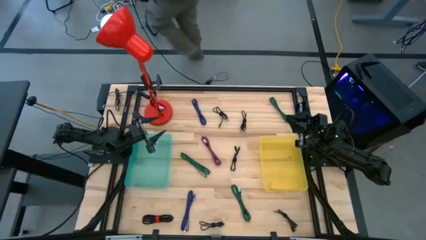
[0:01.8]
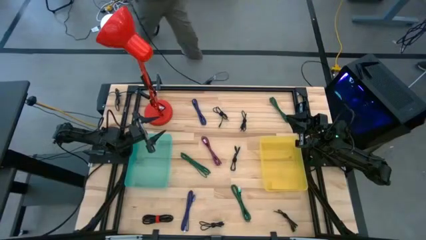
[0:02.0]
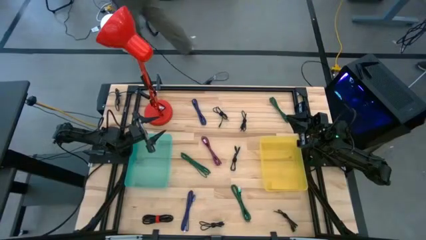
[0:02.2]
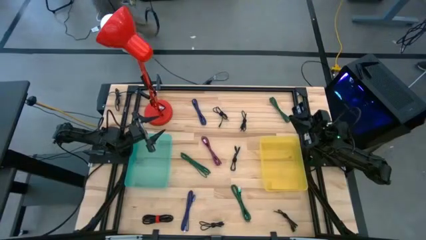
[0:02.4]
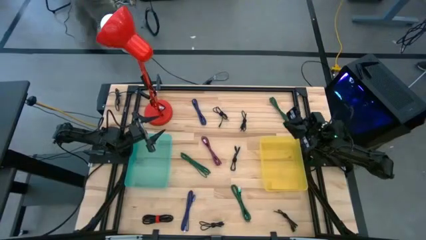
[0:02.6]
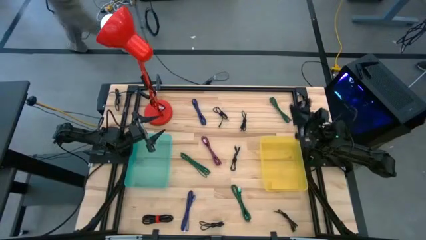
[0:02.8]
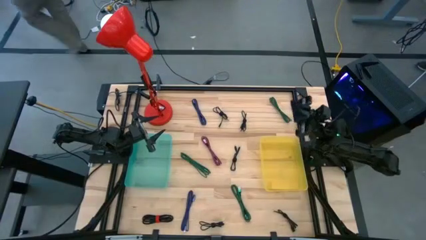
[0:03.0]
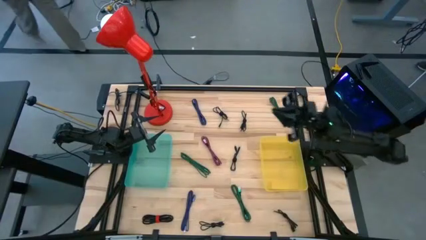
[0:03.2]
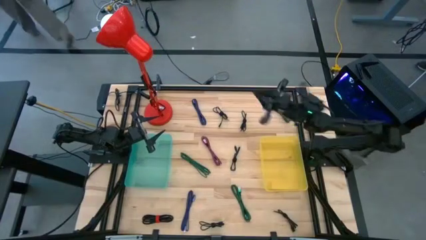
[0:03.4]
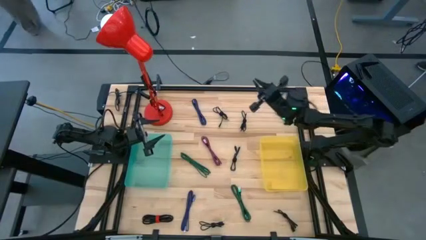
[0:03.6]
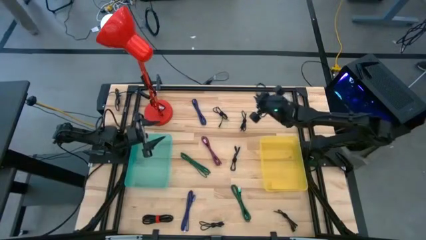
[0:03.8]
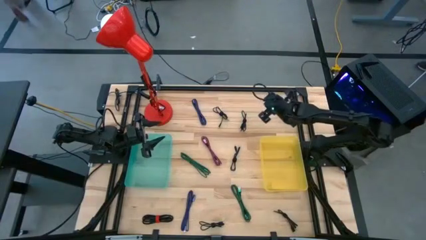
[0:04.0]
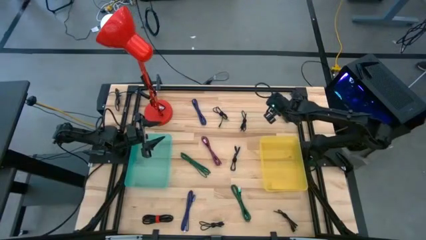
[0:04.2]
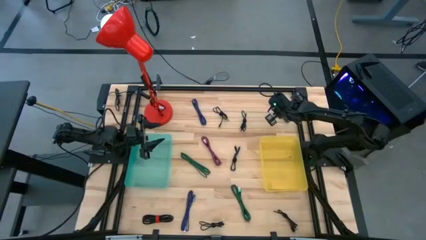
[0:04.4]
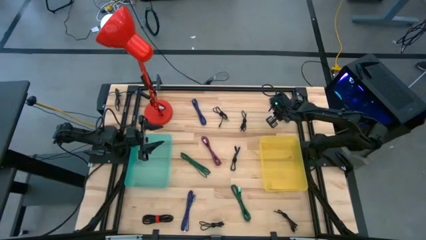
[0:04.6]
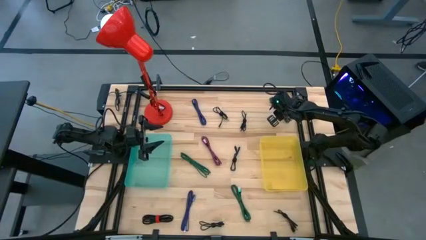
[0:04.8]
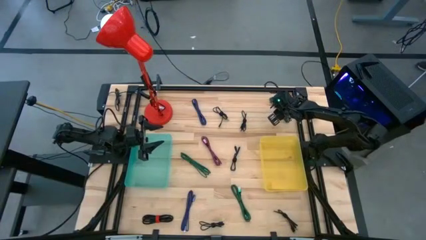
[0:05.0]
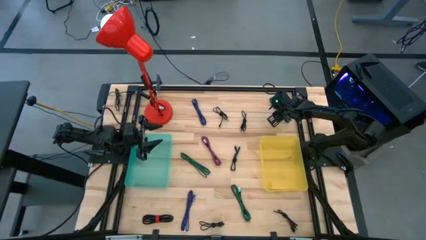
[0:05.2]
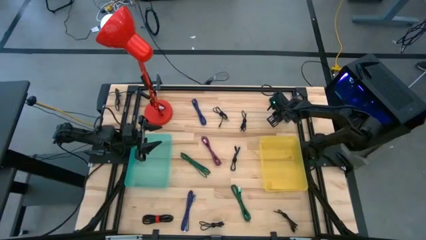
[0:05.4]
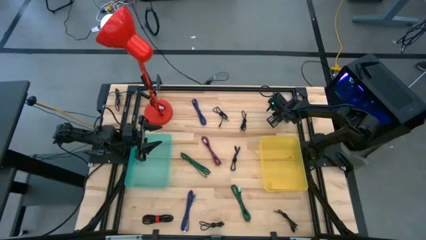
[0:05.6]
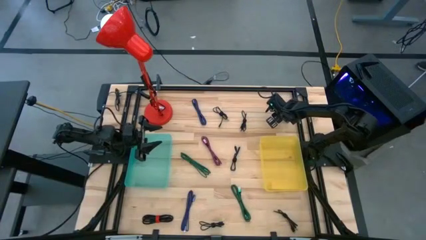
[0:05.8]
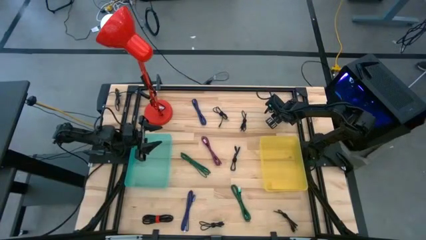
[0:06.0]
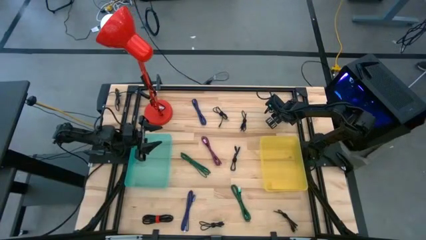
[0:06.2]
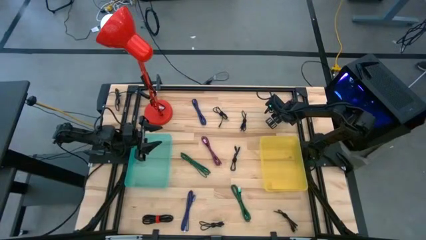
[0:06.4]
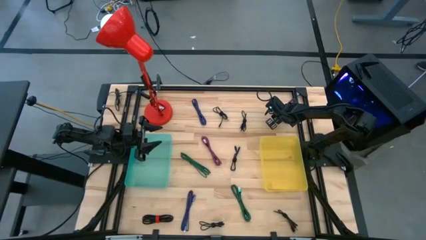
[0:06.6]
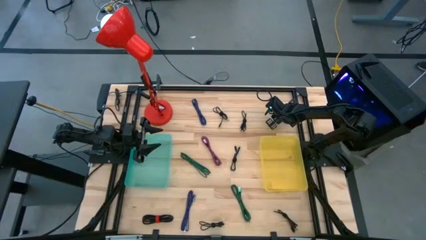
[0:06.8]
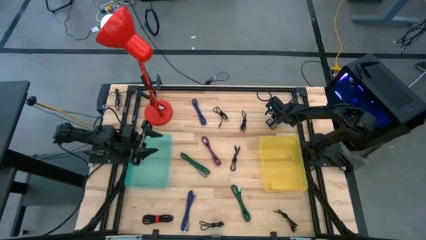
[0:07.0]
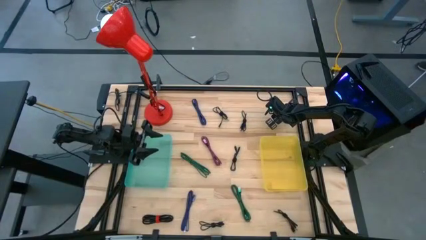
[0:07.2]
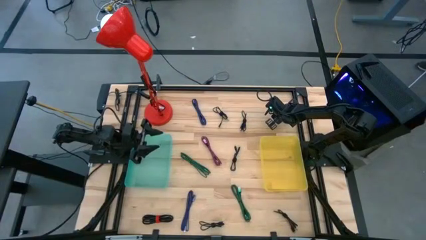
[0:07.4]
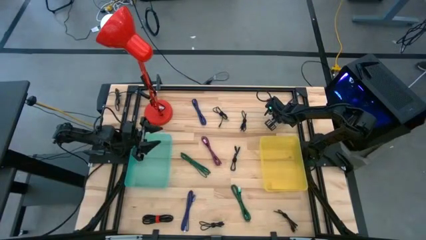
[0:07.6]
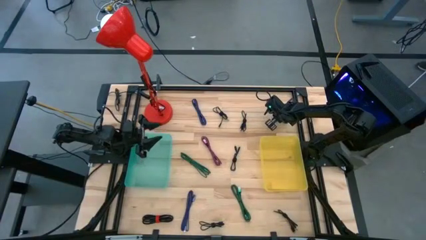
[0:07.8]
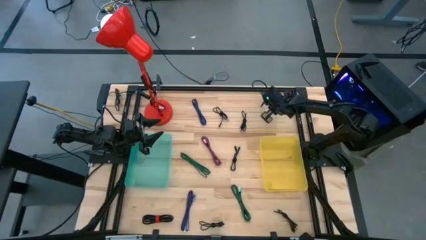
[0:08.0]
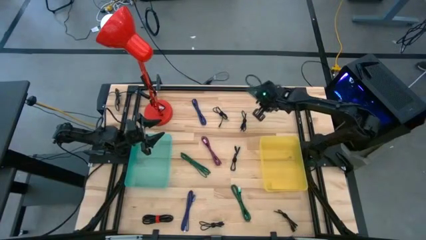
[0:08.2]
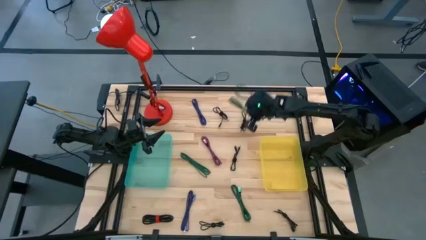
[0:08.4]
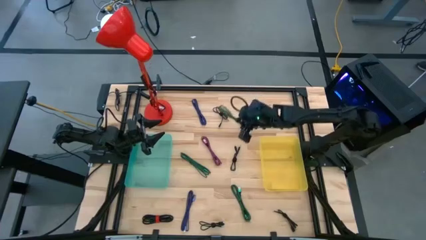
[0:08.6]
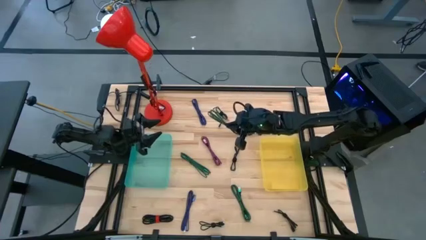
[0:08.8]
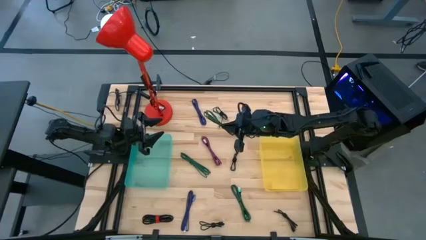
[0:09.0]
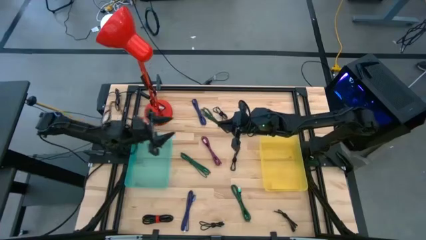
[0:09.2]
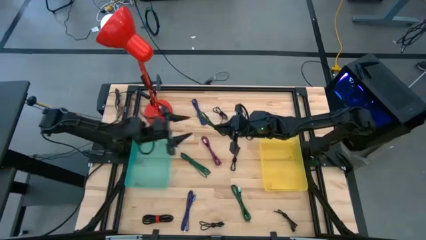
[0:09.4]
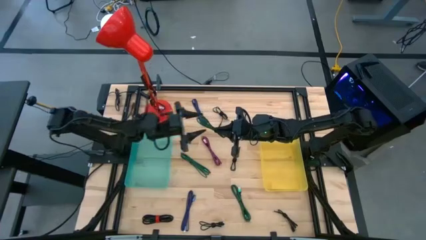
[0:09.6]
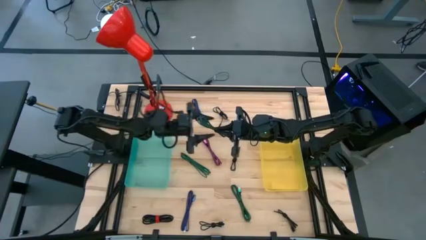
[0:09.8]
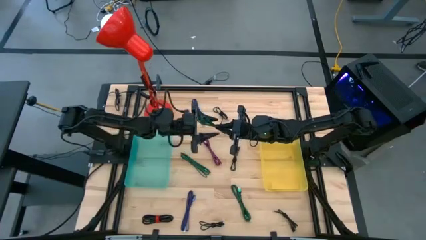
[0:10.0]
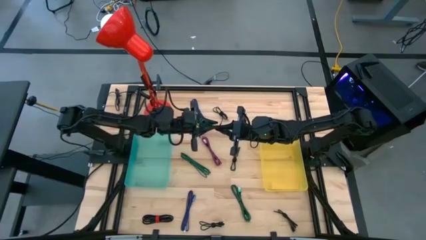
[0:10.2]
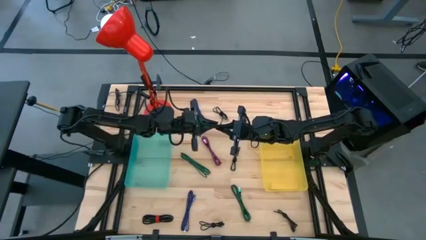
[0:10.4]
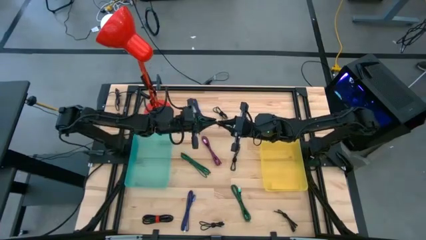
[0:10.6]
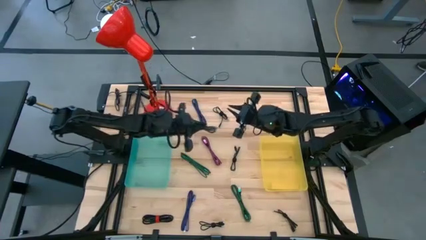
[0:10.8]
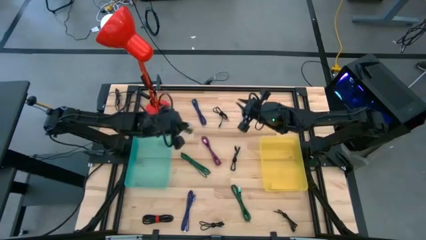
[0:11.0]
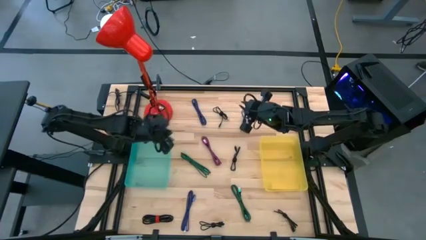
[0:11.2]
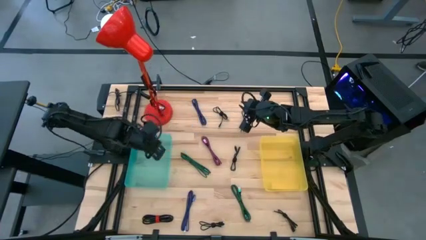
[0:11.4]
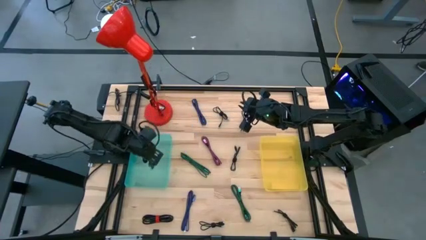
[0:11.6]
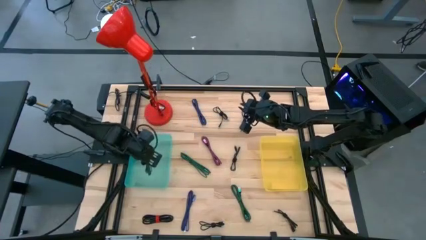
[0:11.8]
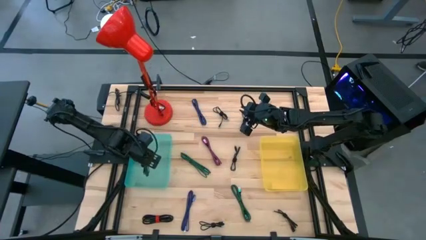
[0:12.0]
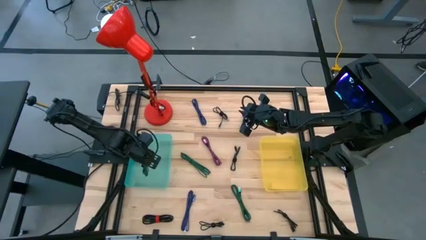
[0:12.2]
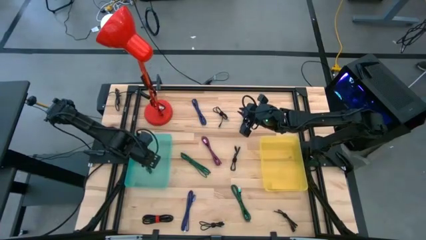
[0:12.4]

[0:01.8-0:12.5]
Task: Pick & Place USB Port
Put the top right green charger cable into the green bin

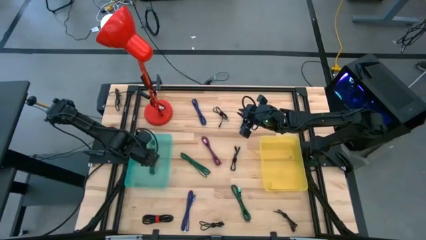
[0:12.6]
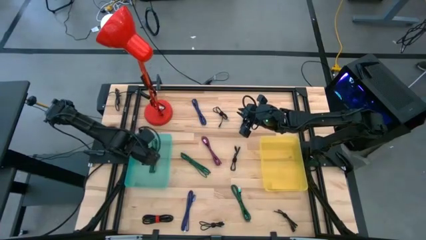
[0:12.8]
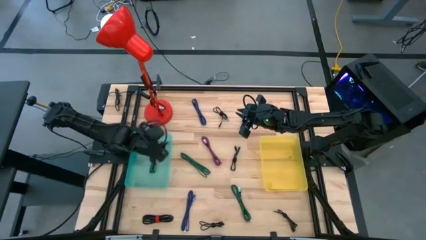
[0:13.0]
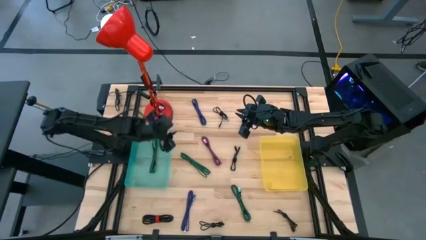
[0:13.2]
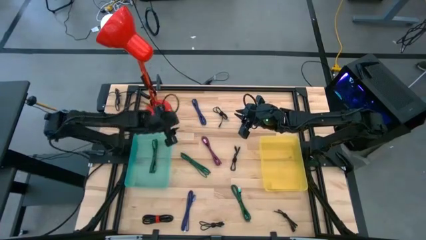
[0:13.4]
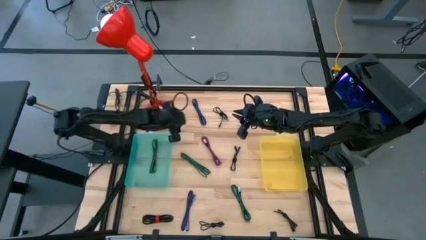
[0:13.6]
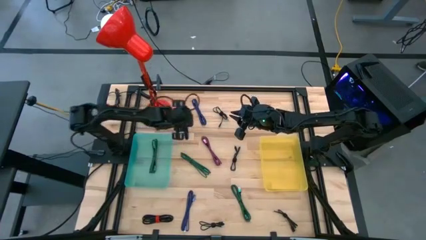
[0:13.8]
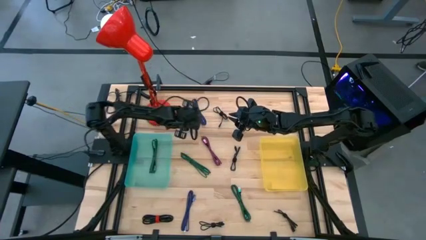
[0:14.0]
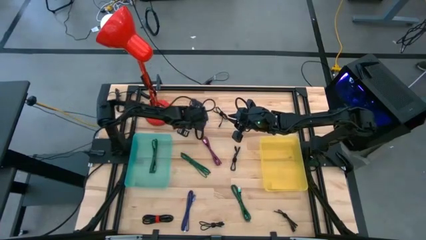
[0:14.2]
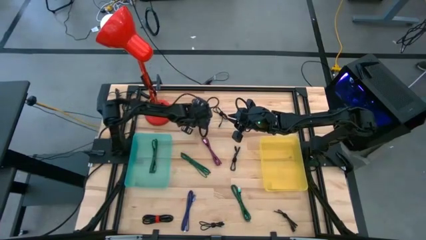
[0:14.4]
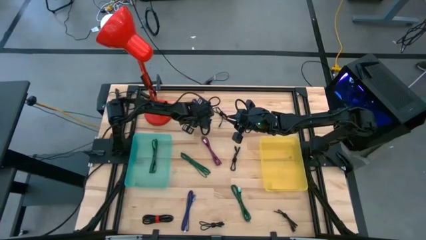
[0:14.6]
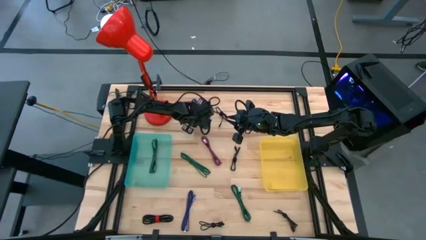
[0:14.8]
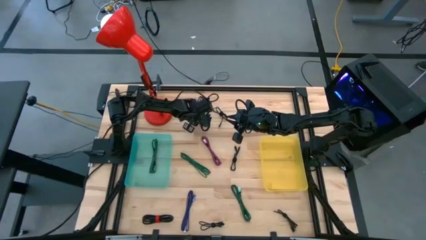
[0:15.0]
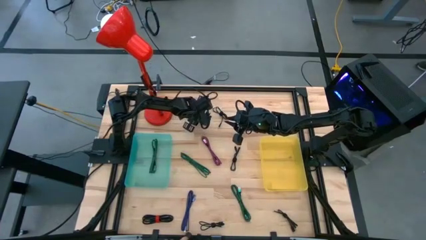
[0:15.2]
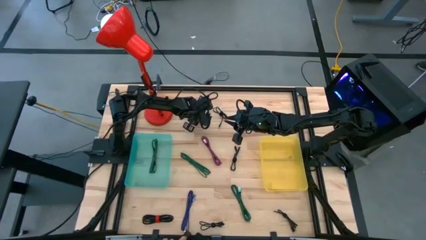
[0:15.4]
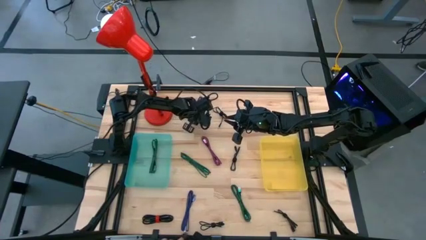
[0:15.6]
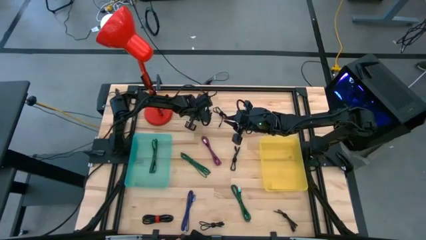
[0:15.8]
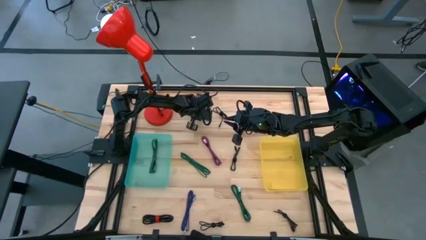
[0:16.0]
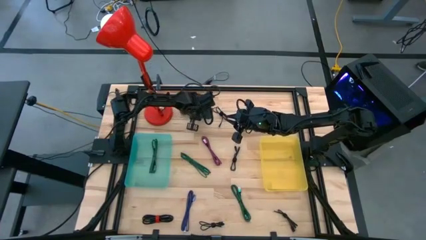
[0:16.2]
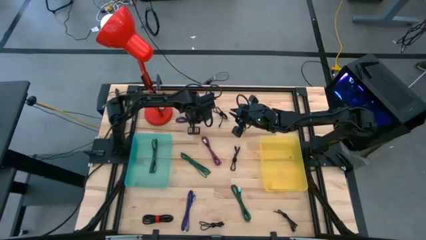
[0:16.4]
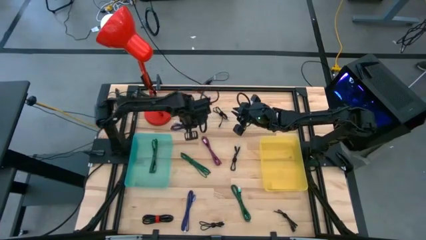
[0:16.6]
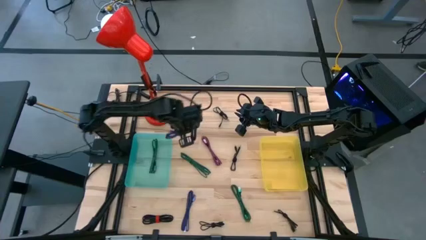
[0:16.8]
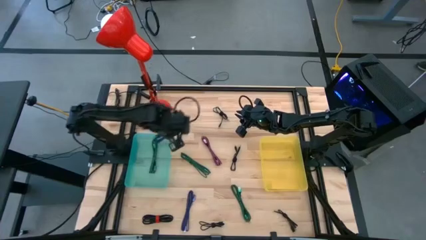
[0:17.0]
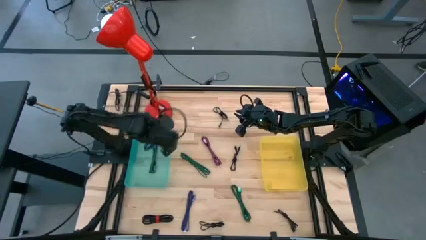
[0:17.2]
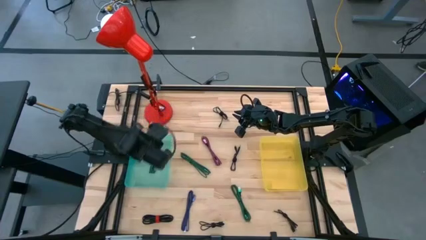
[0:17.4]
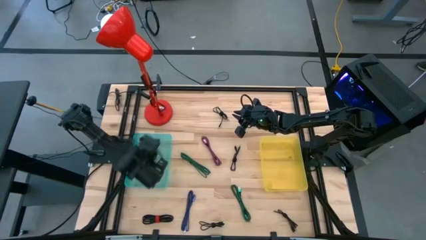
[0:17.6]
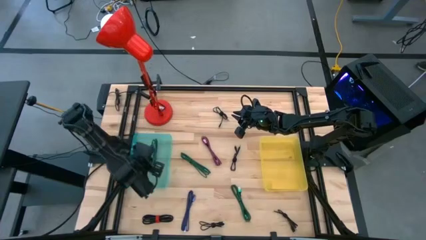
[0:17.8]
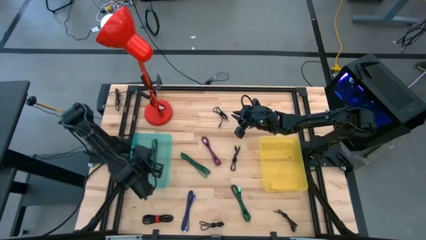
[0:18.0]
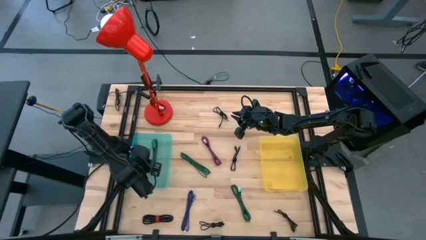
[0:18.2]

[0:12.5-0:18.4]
Put the top blue charger cable into the green bin
